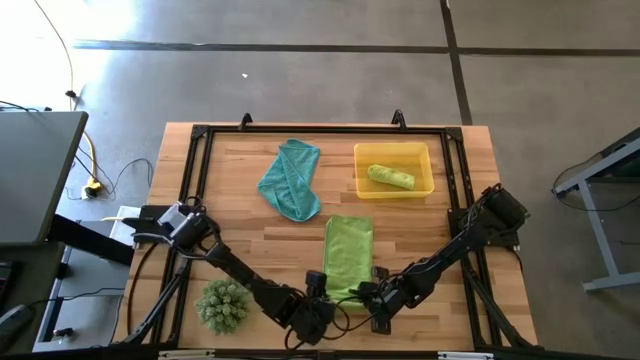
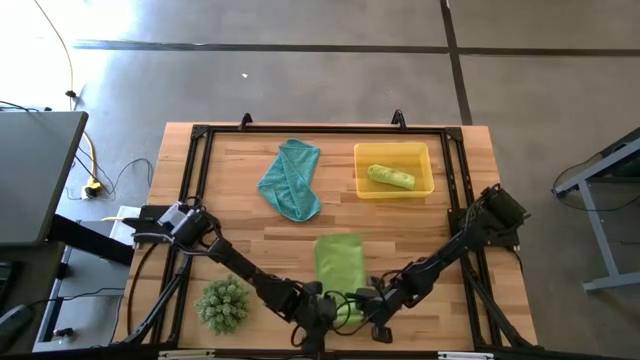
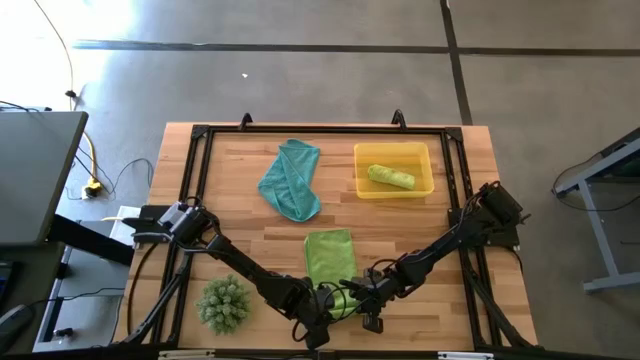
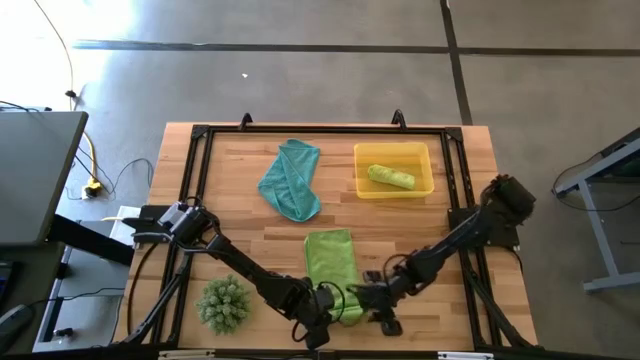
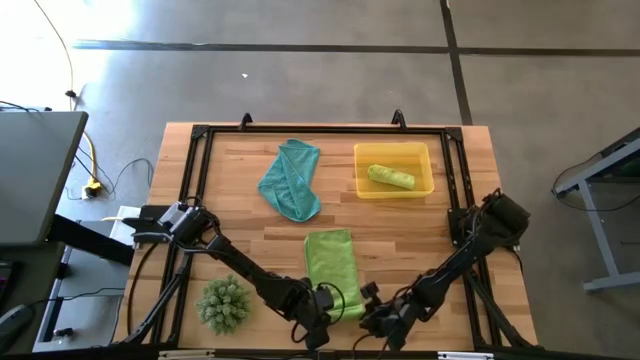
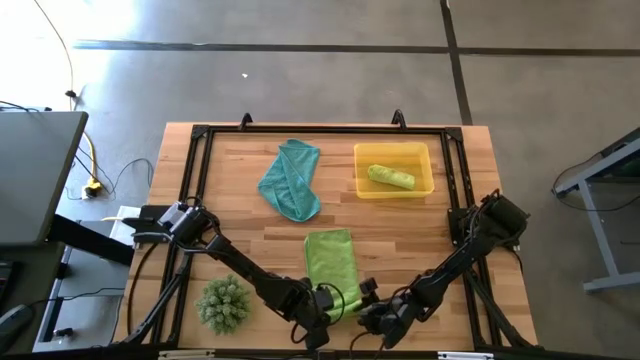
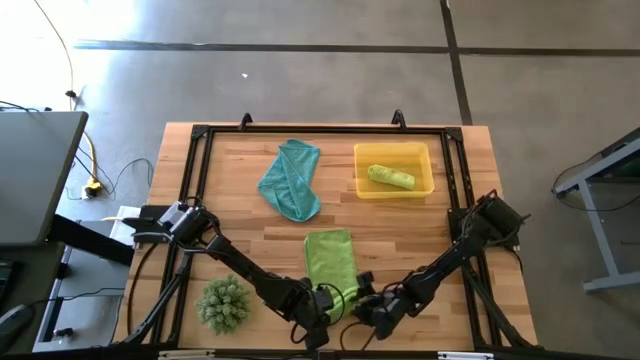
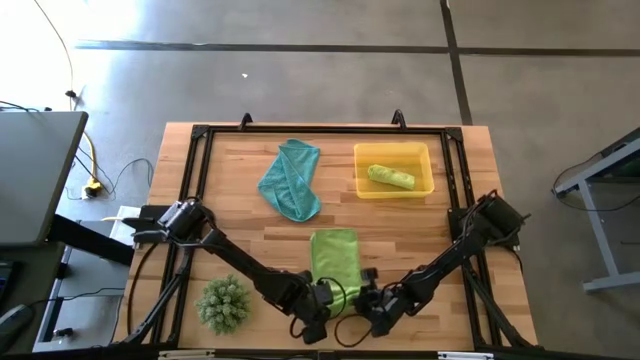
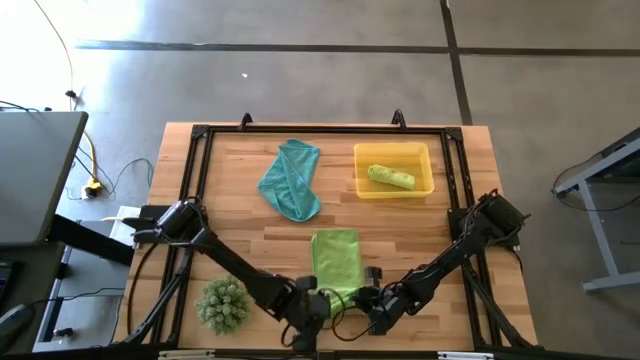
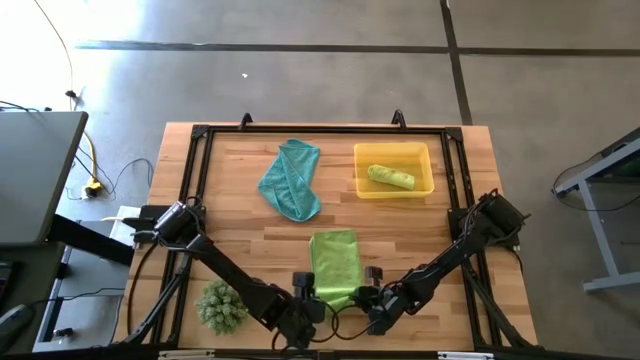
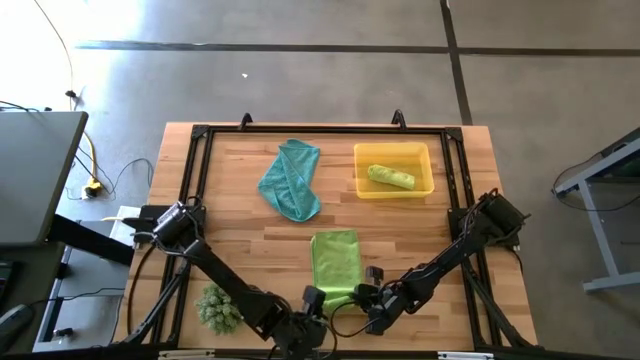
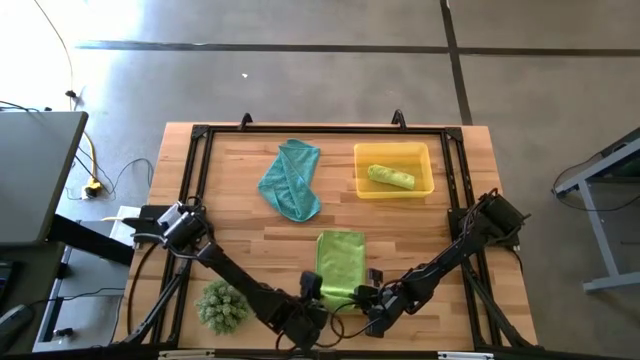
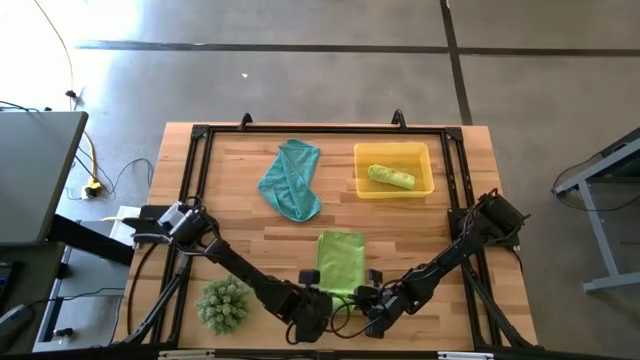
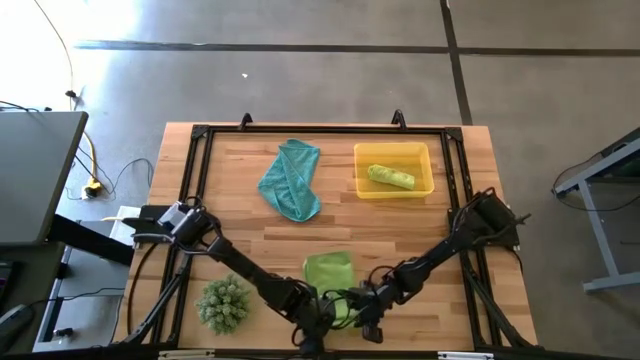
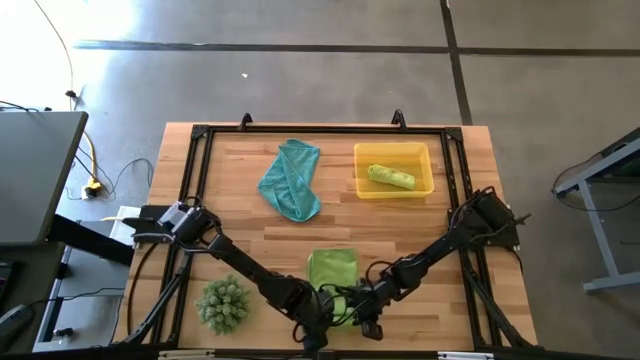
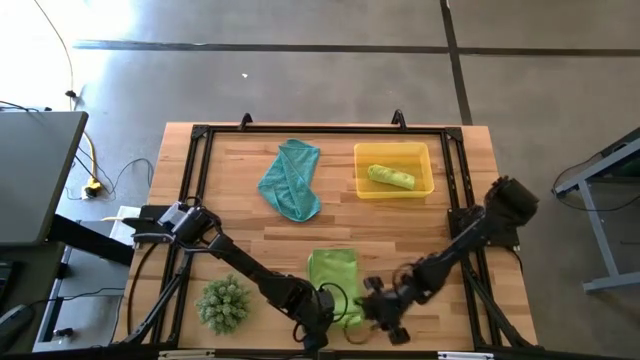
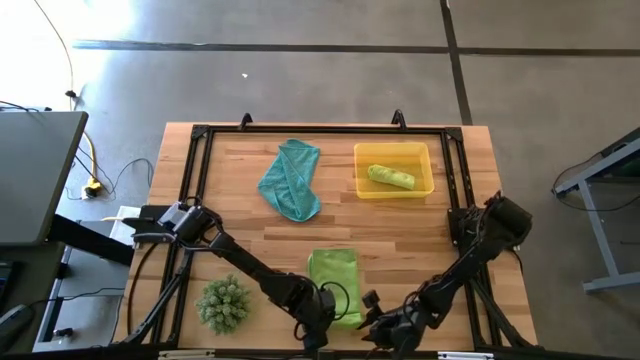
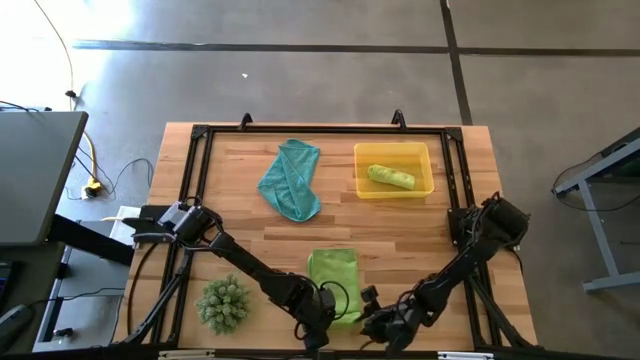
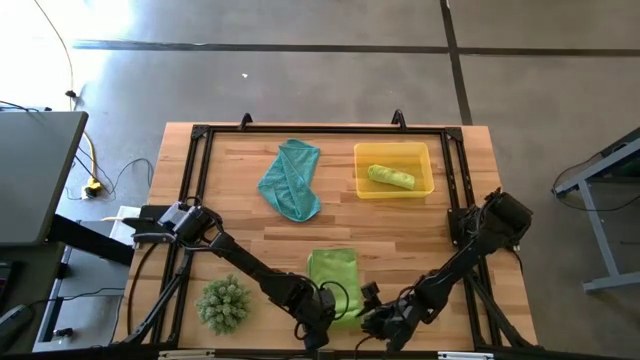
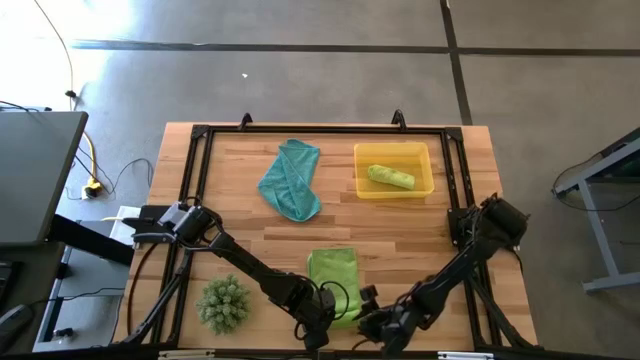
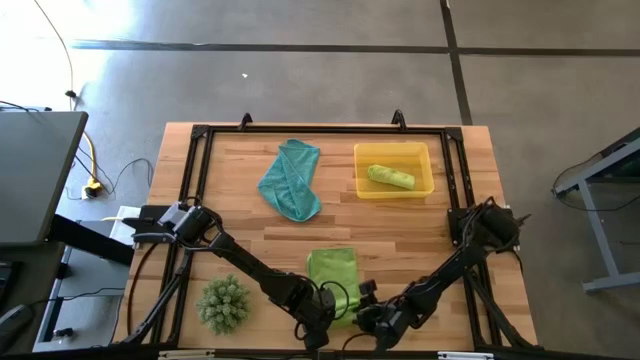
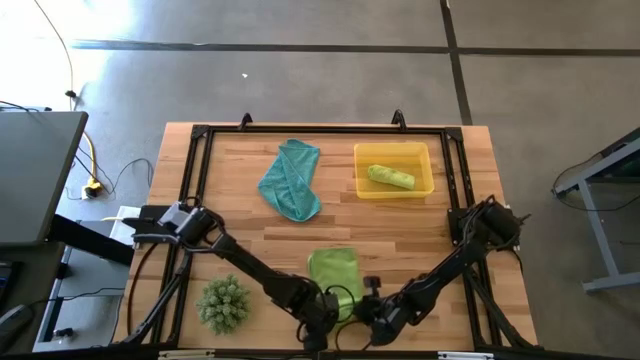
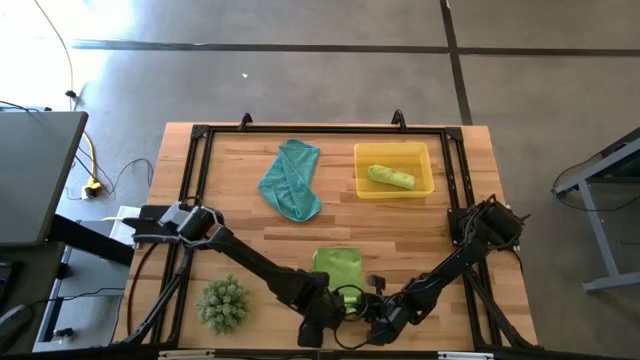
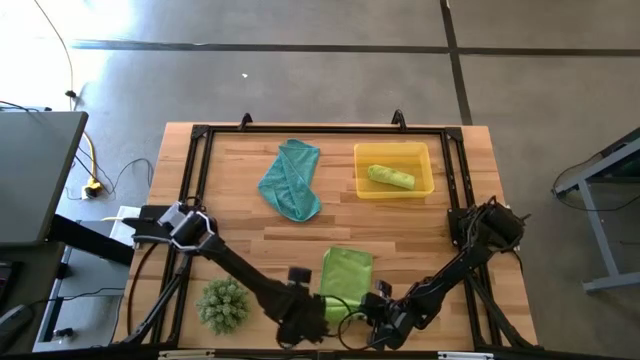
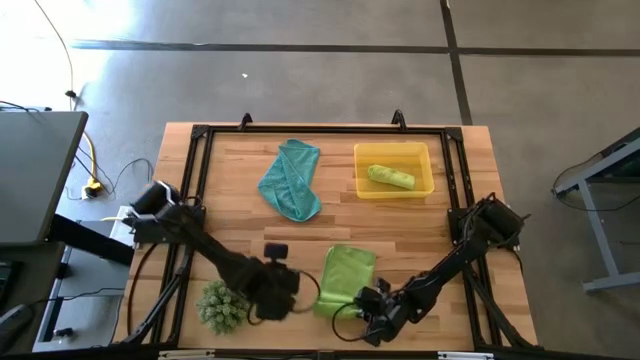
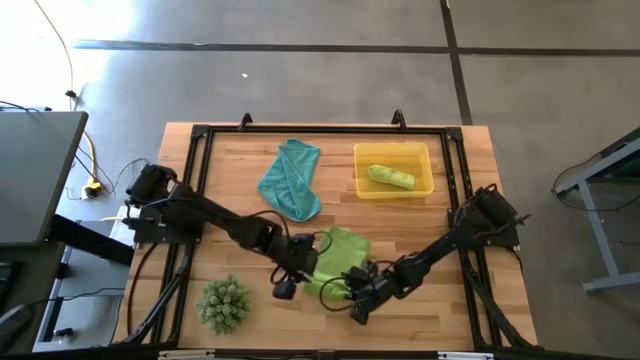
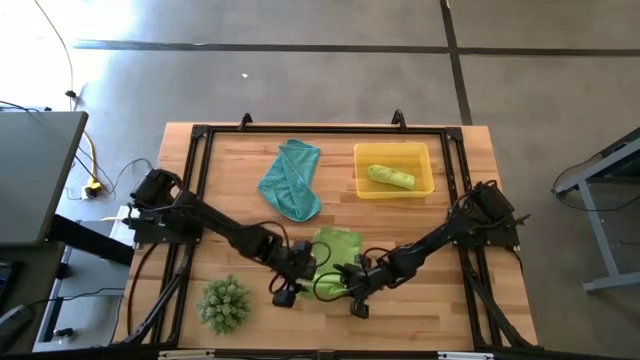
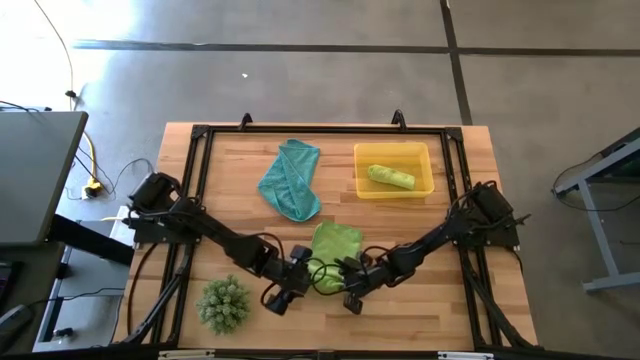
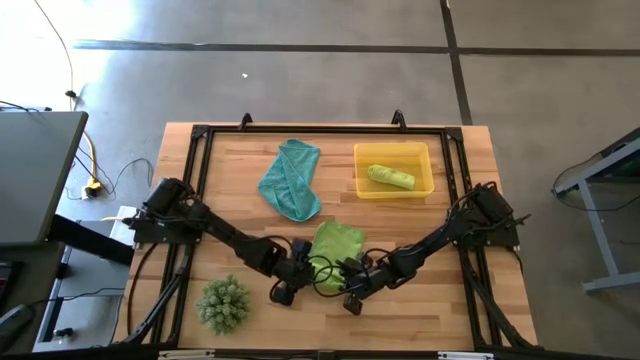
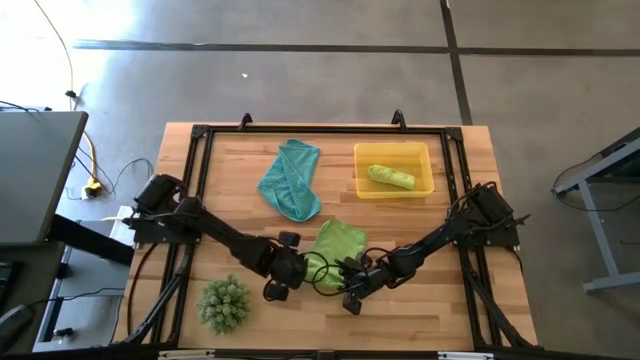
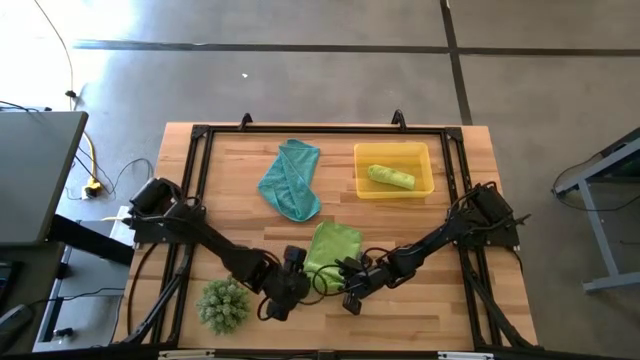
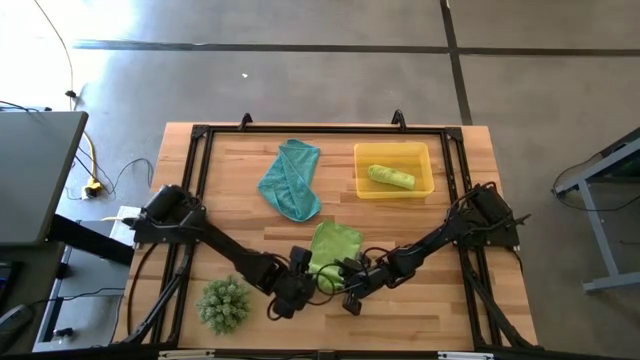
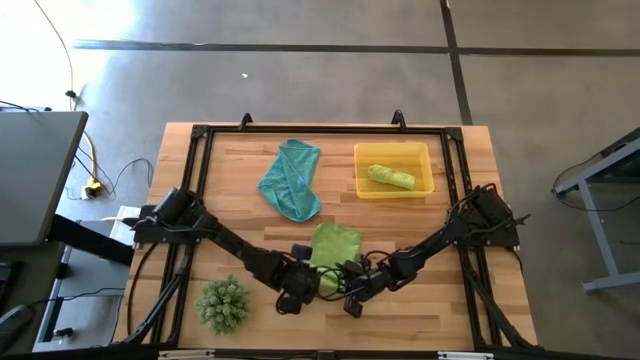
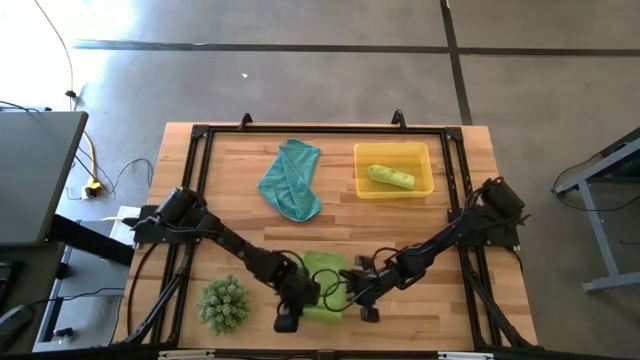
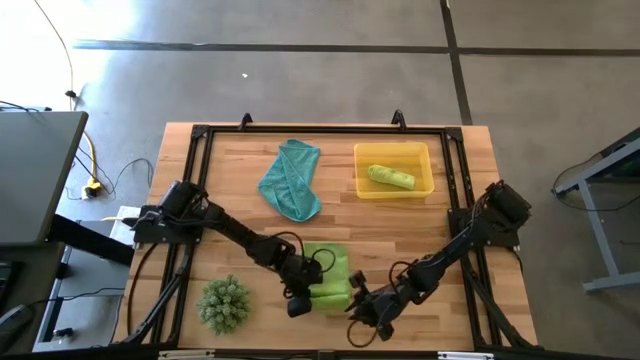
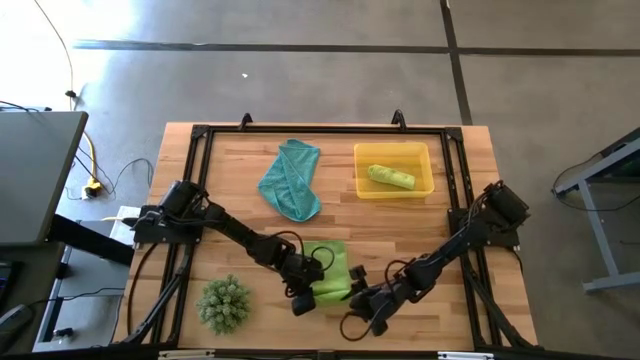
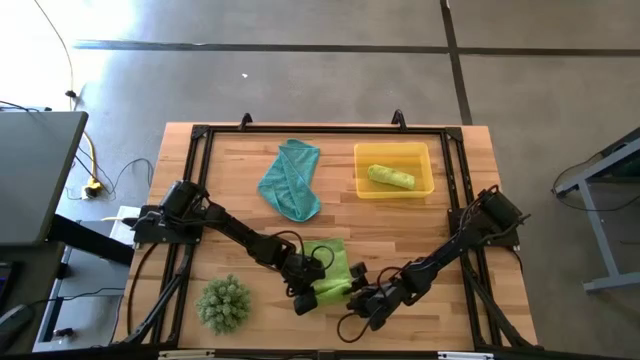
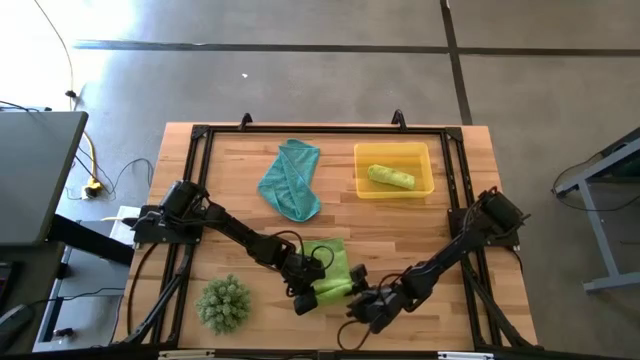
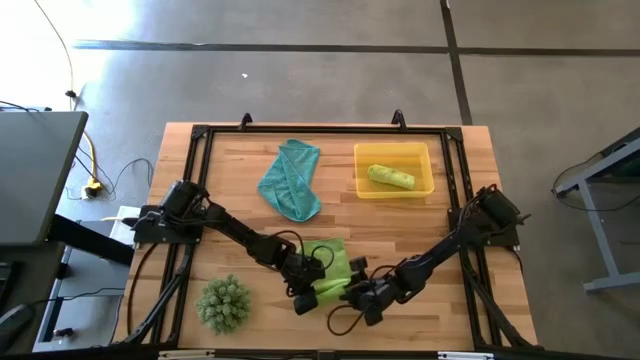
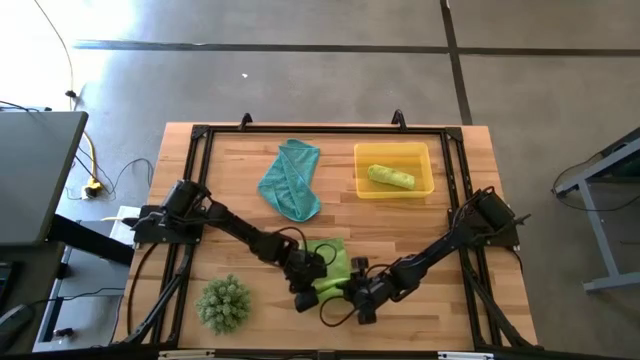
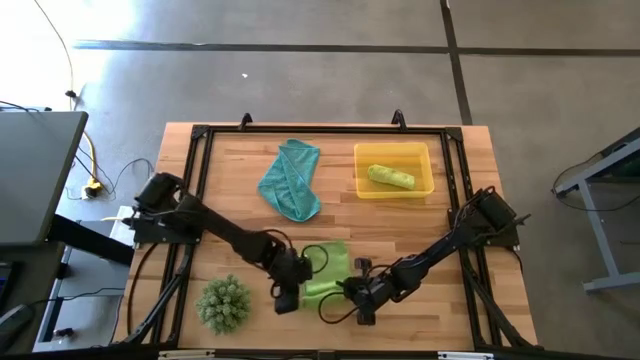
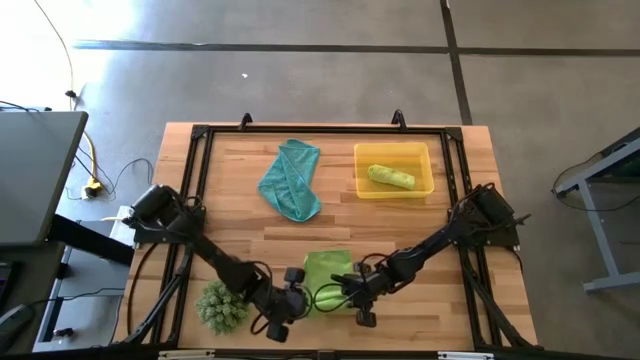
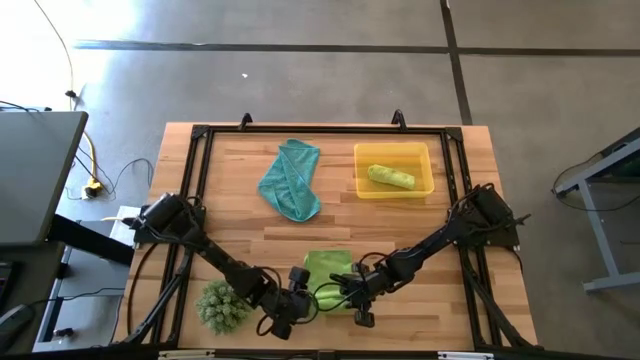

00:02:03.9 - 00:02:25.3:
Task: Roll microfiber towels into tight, uniform cylinder then place into a basket
Roll the green towel
